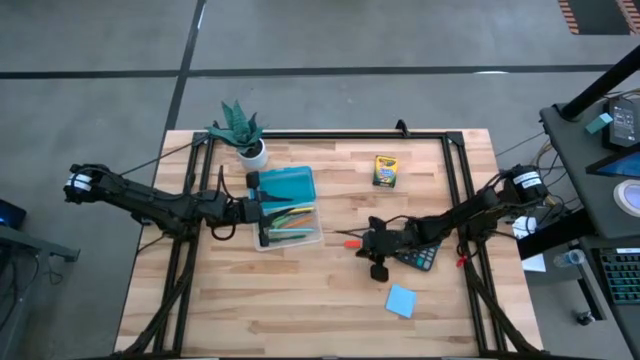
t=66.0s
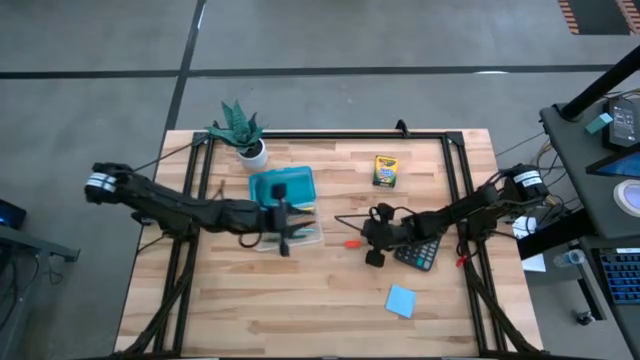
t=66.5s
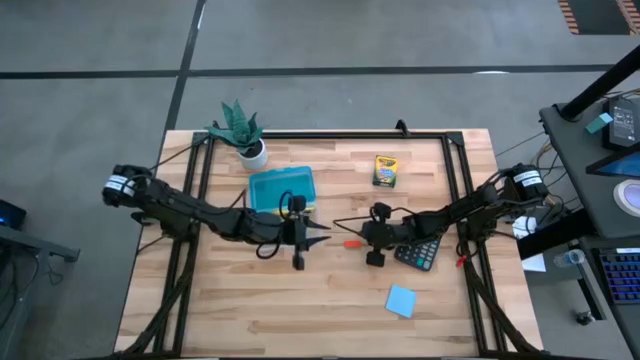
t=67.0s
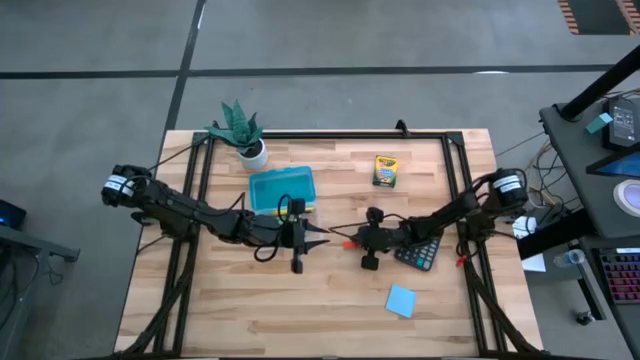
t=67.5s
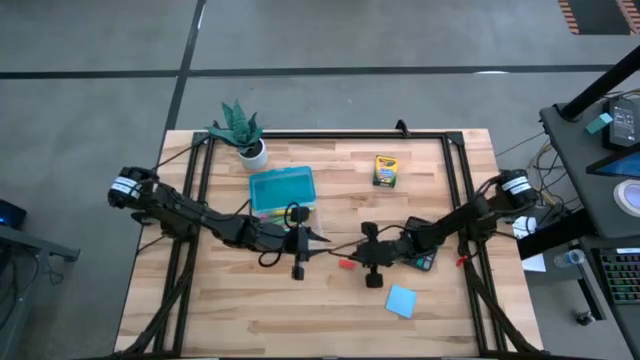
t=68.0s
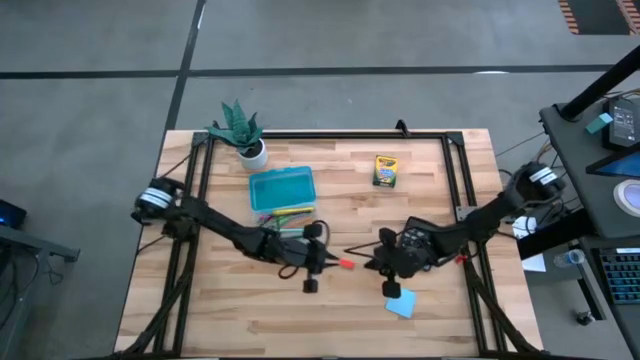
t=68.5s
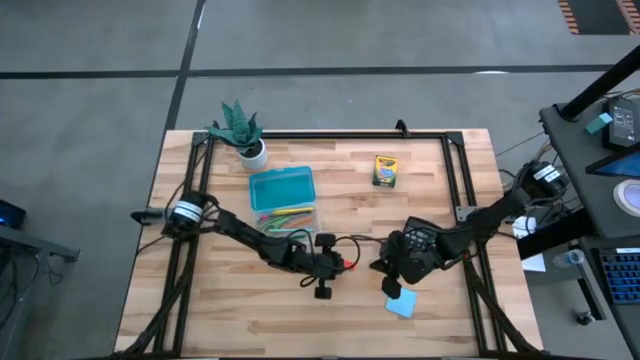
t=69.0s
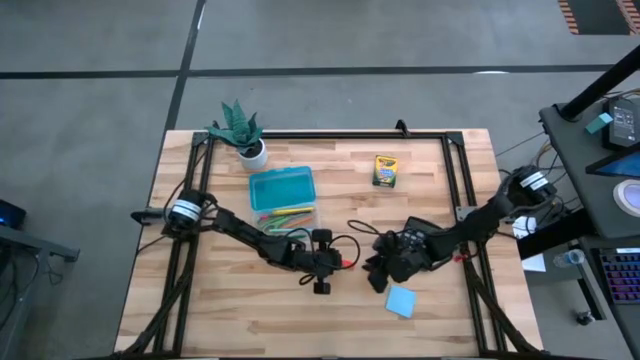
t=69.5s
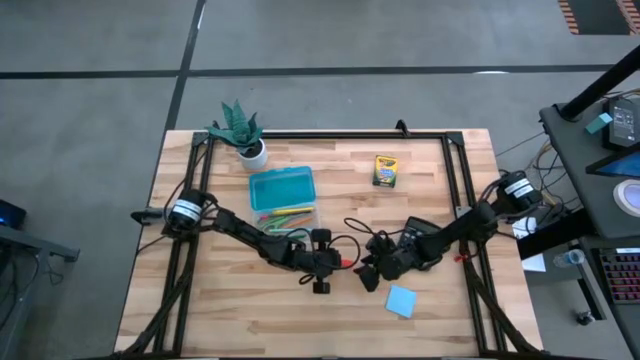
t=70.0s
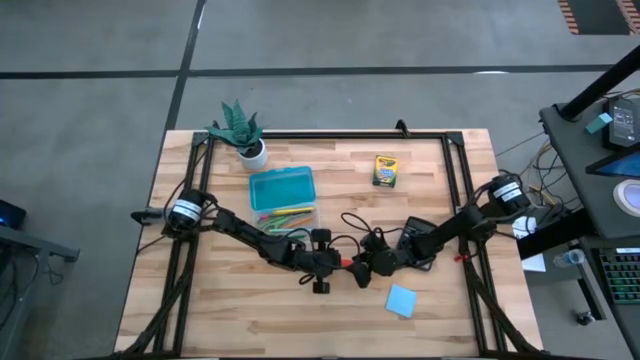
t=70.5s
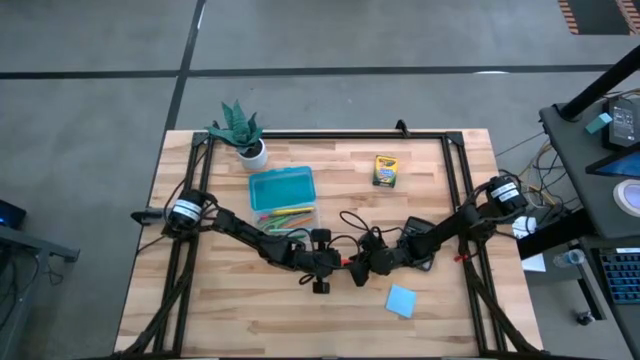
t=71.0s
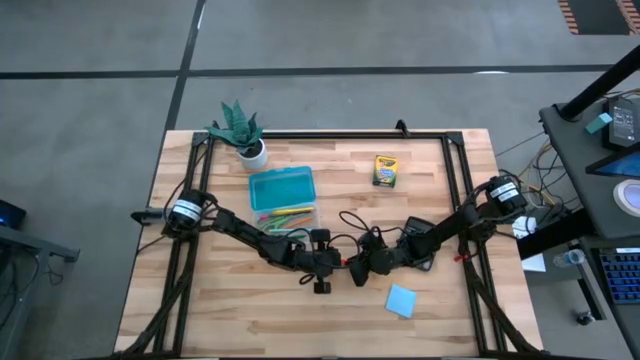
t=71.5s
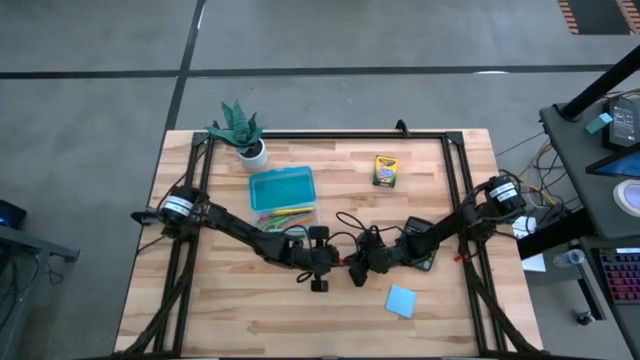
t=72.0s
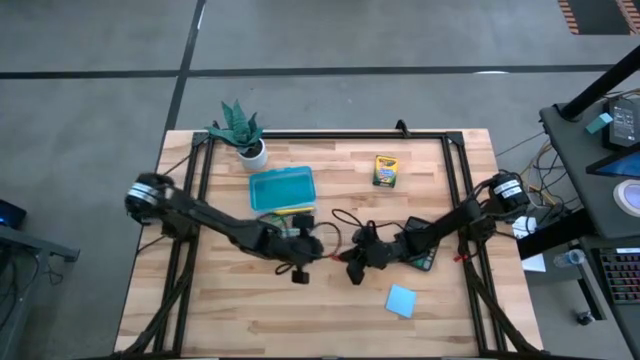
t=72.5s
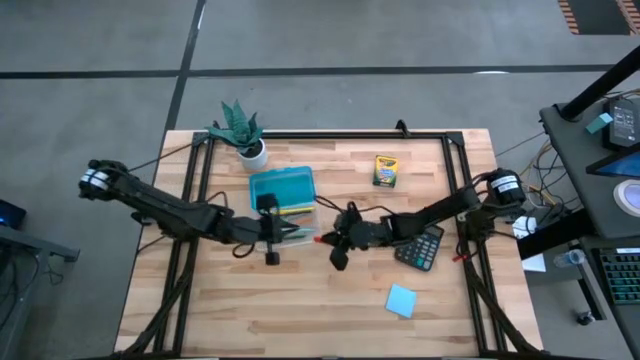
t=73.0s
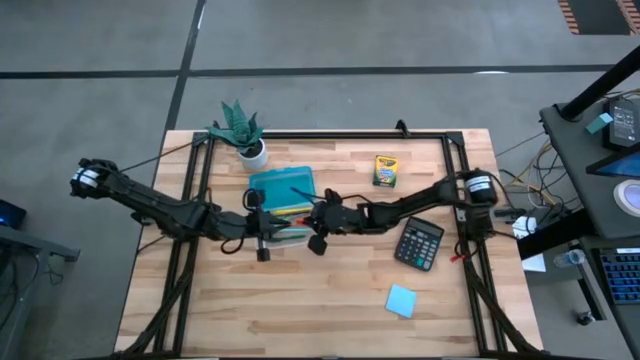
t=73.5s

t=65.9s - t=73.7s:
Task: Pack school essentials
Put the orange eraser into the blue supply box

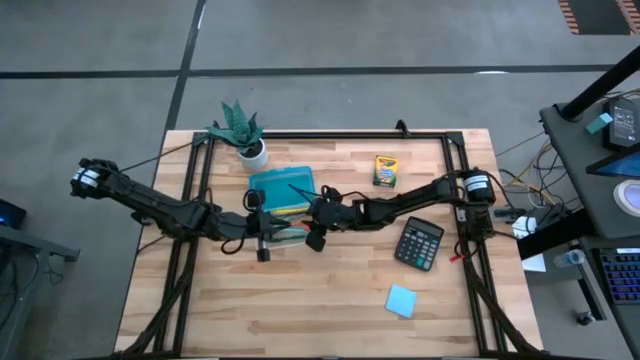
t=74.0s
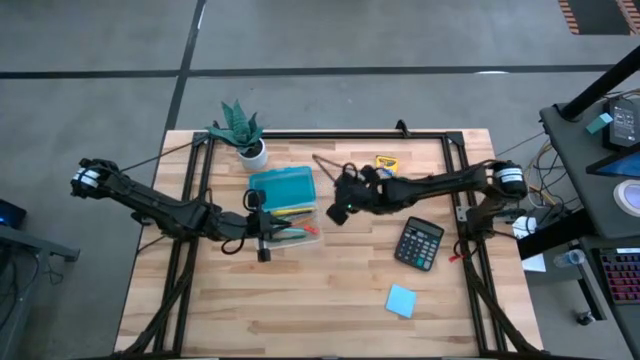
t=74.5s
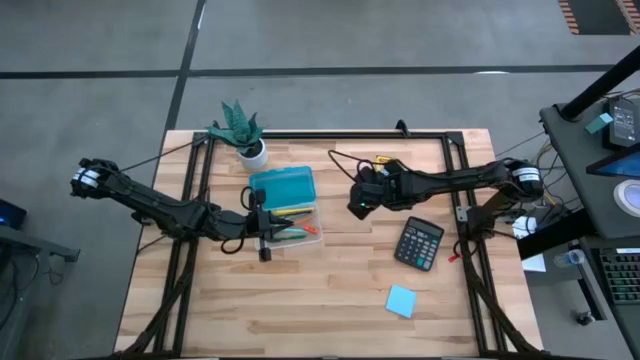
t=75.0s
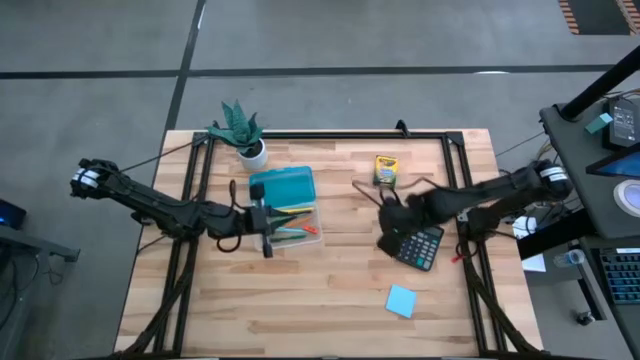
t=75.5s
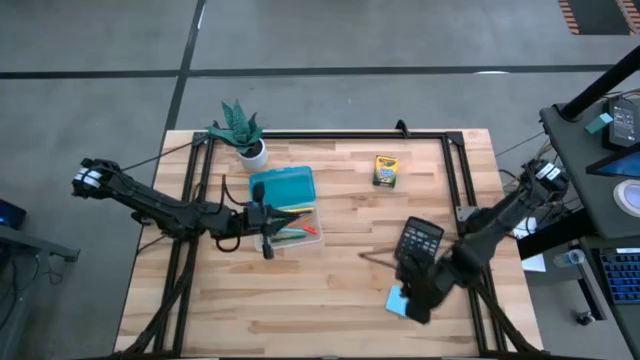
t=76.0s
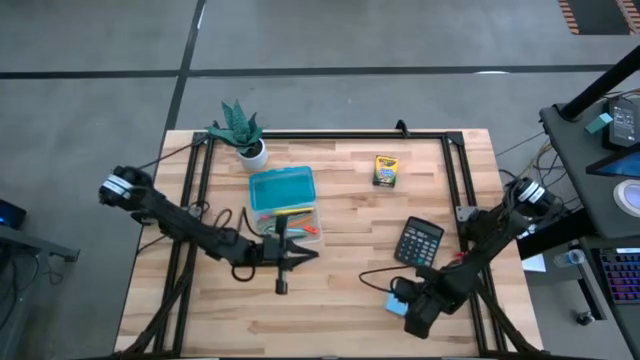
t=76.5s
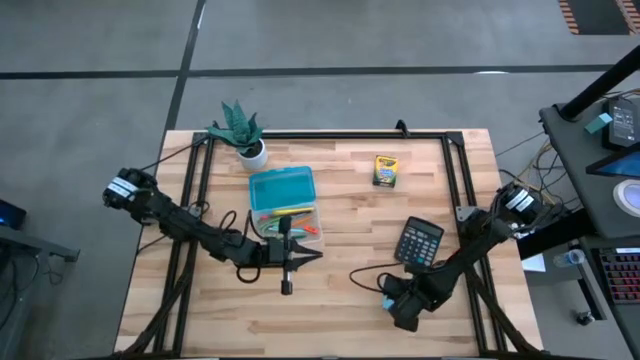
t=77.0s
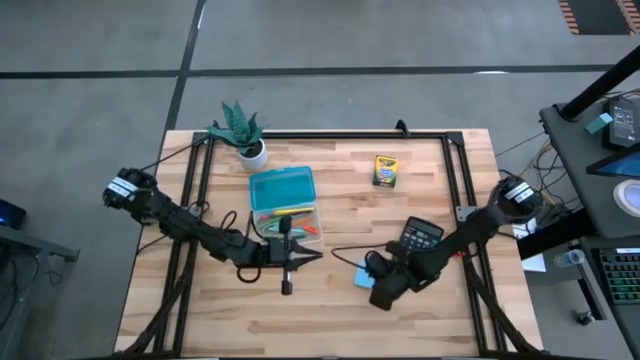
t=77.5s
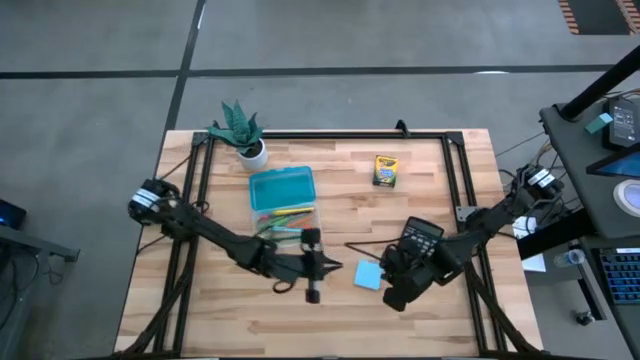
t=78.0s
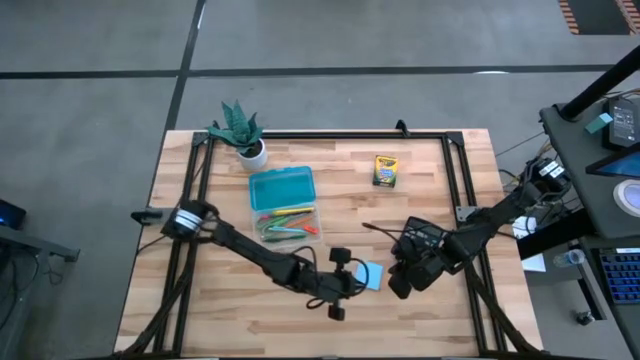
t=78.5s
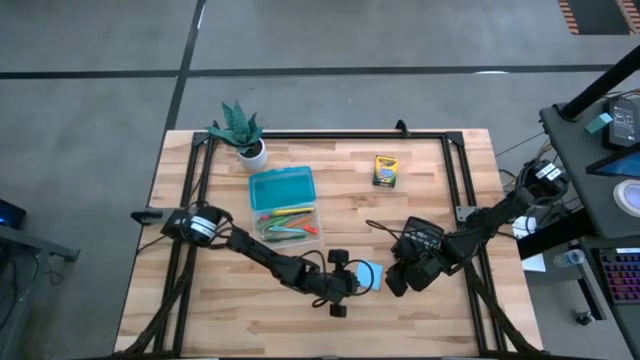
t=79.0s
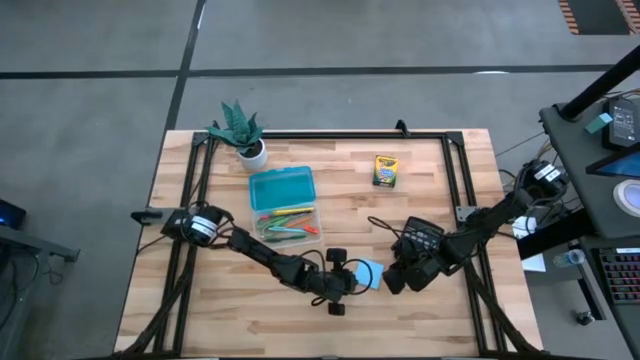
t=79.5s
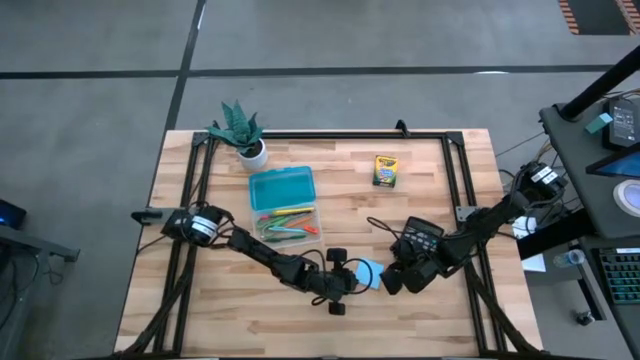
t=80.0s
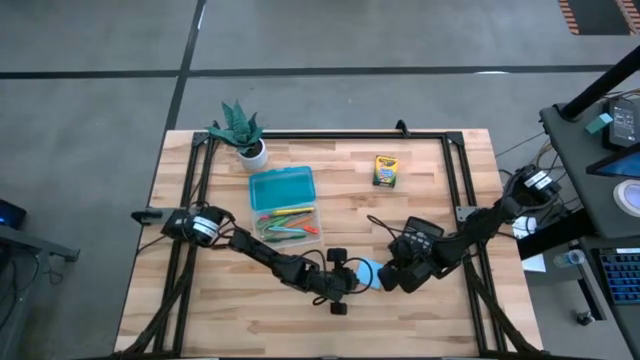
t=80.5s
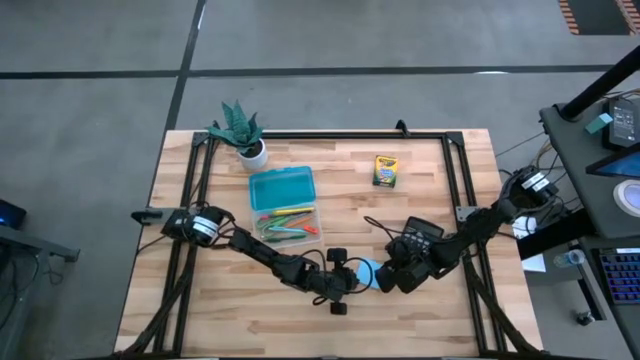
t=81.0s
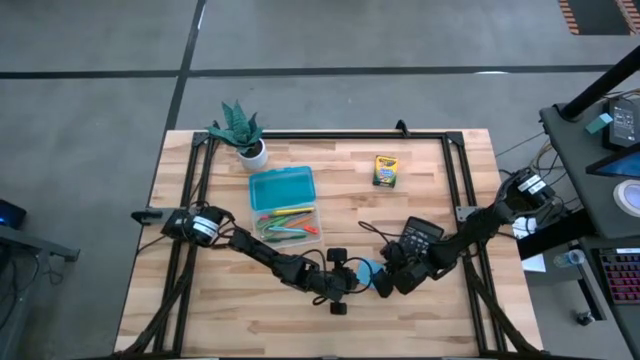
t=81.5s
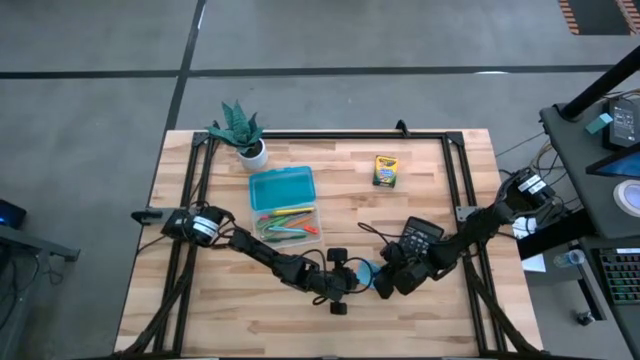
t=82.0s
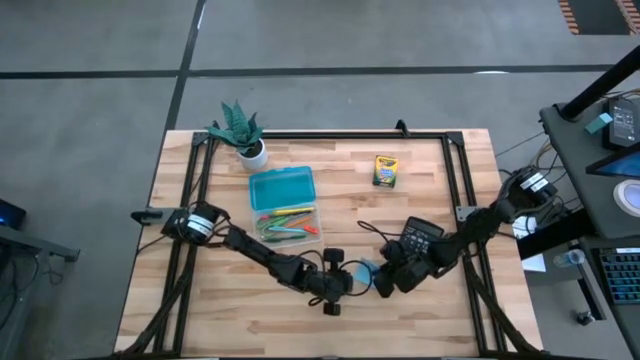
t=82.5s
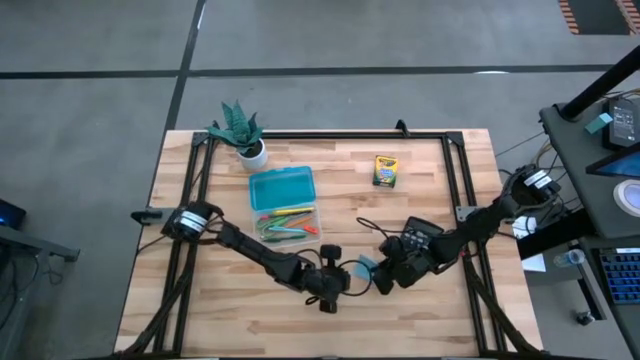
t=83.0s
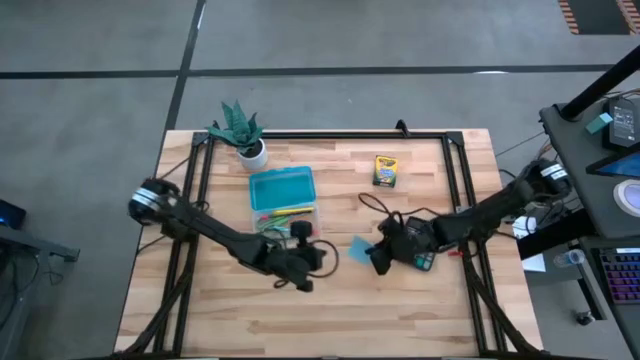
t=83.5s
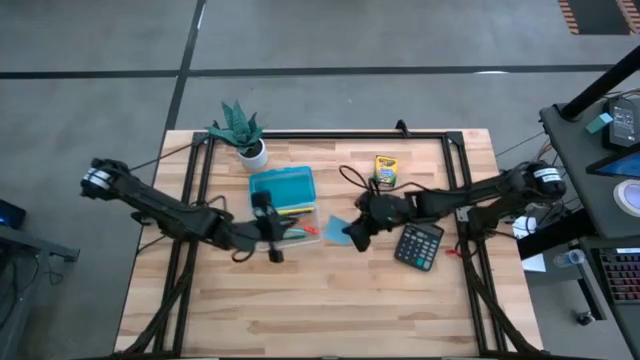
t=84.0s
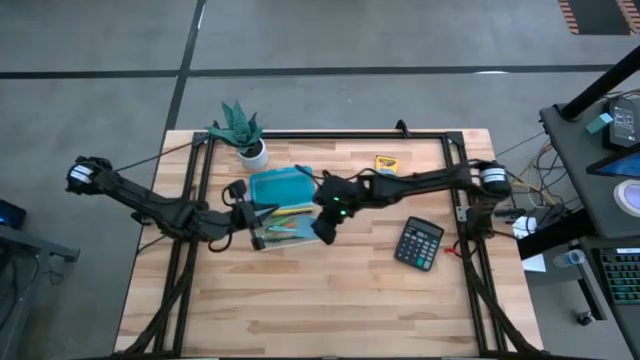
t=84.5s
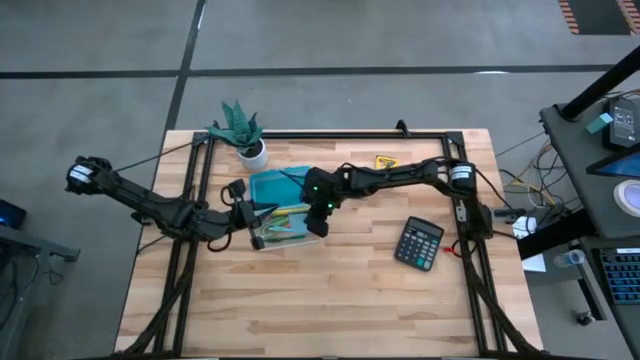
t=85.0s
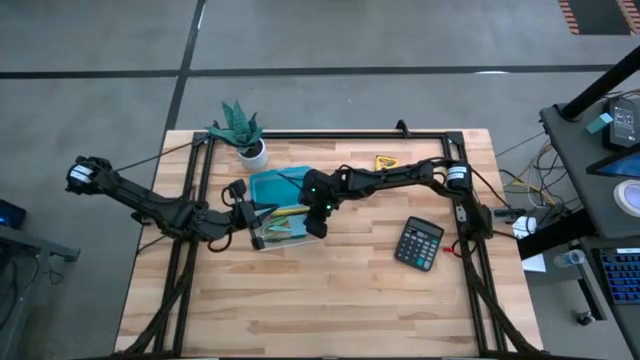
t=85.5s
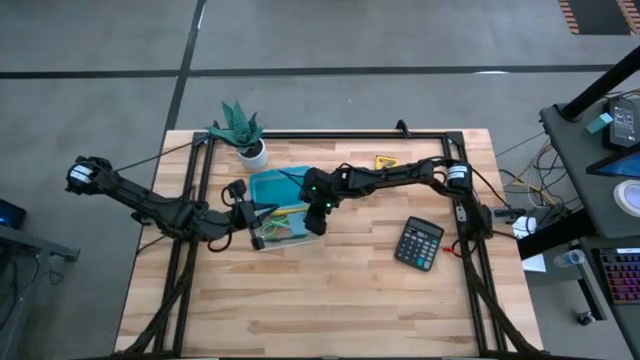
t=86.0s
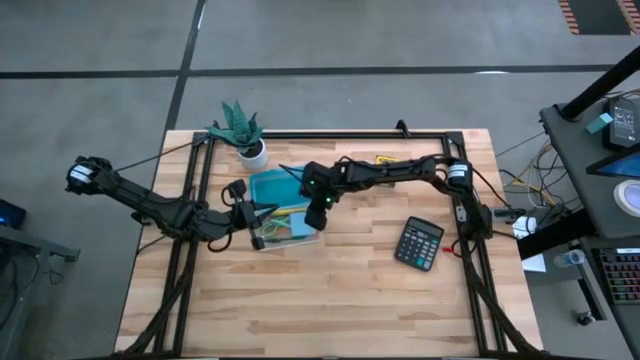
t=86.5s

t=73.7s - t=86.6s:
Put the blue sticky notes into the blue supply box

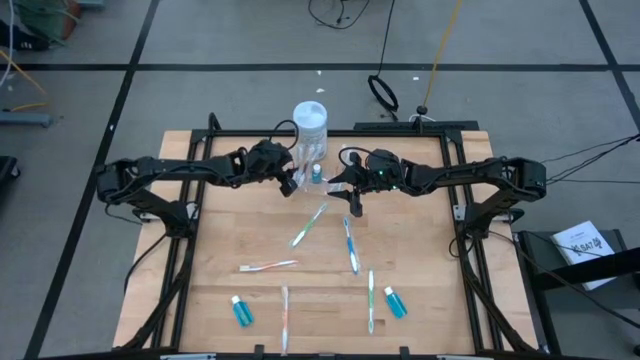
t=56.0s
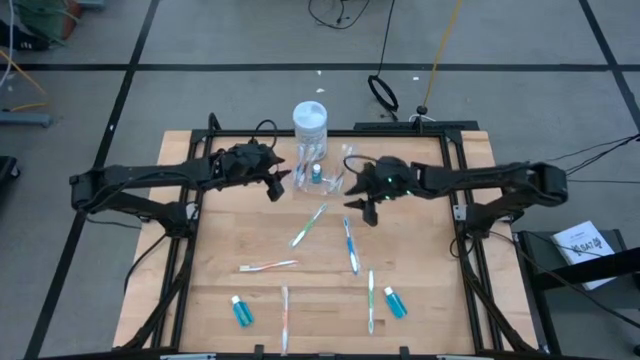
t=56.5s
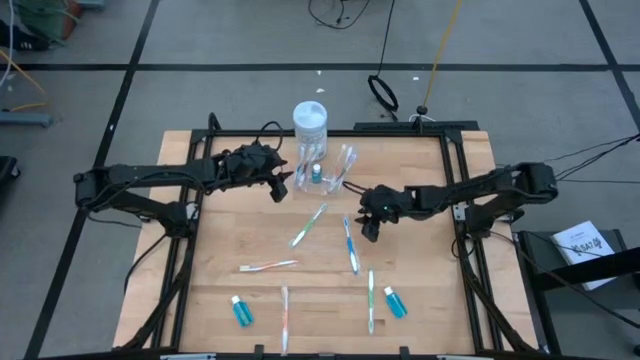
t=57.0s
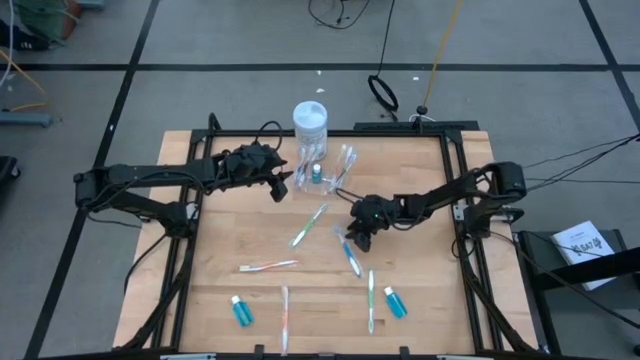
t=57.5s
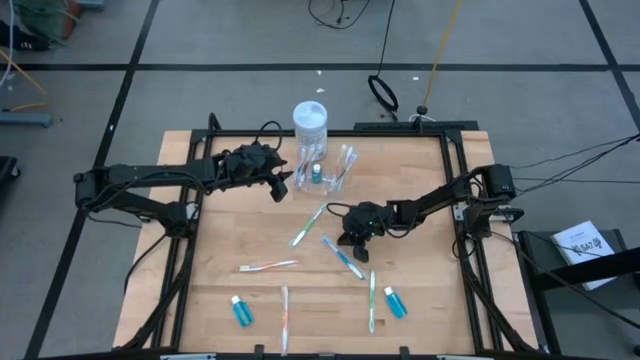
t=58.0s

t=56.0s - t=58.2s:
Task: Pick & Place toothbrushing station
Put the blue toothbrush into the transparent organizer
